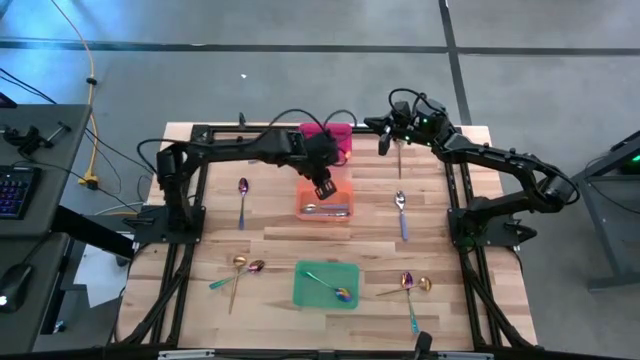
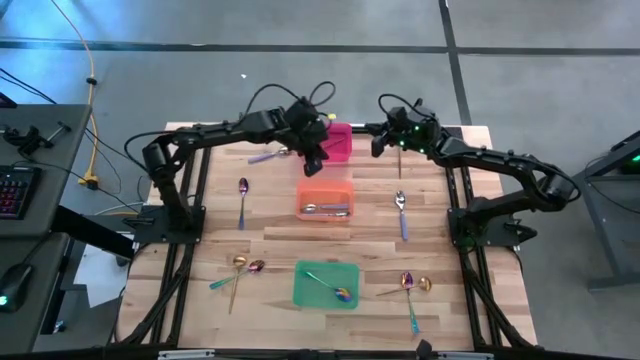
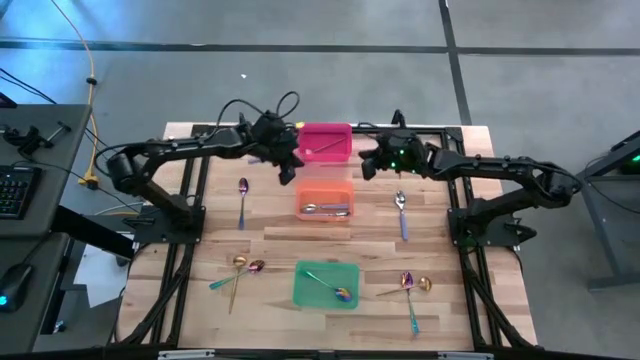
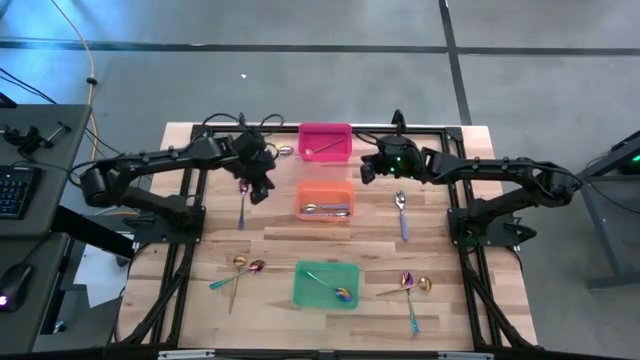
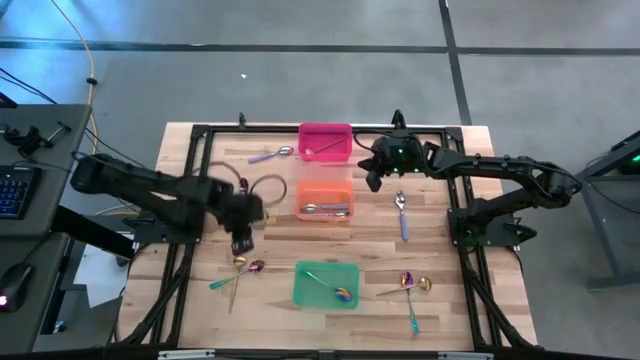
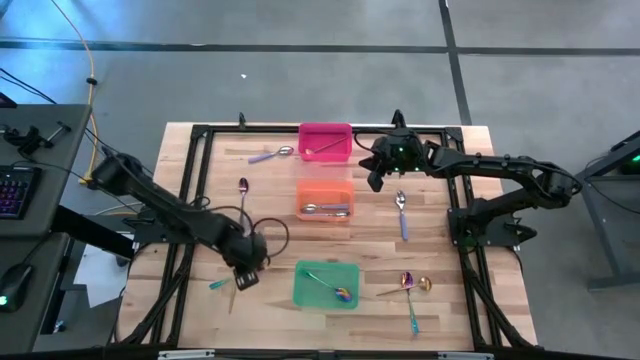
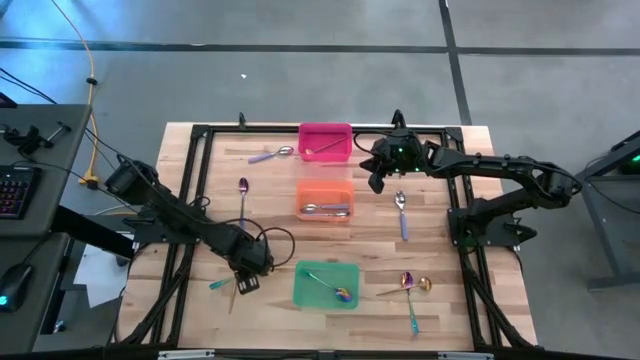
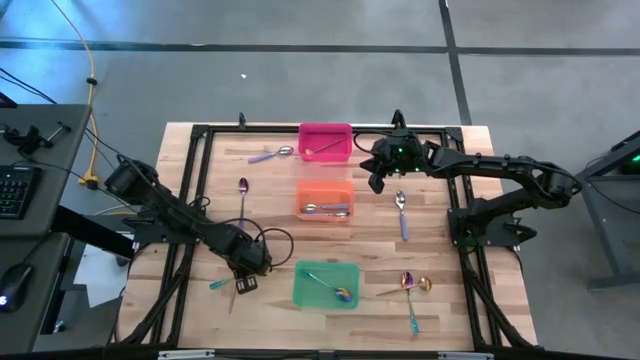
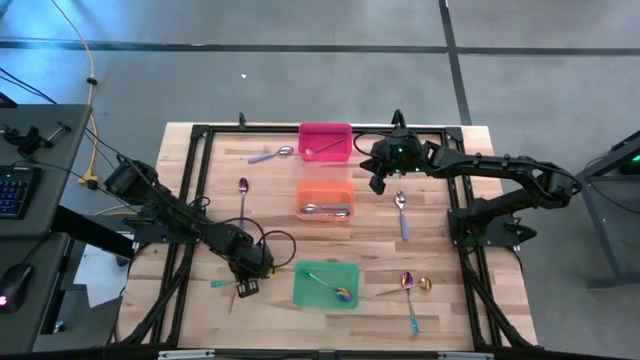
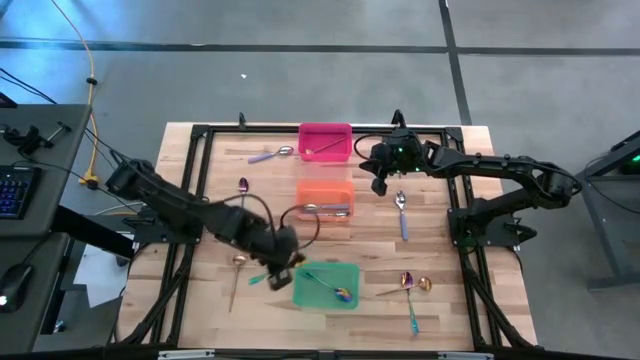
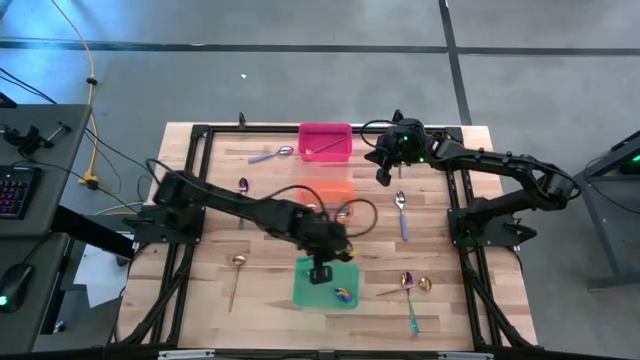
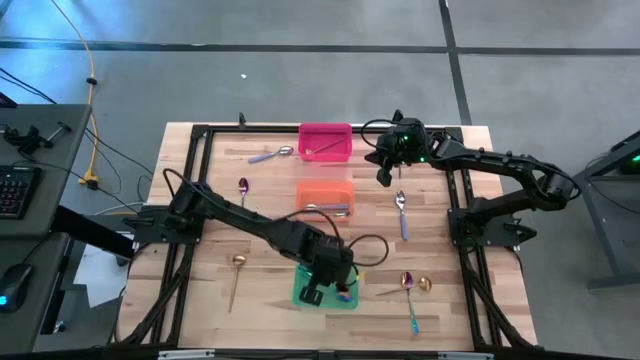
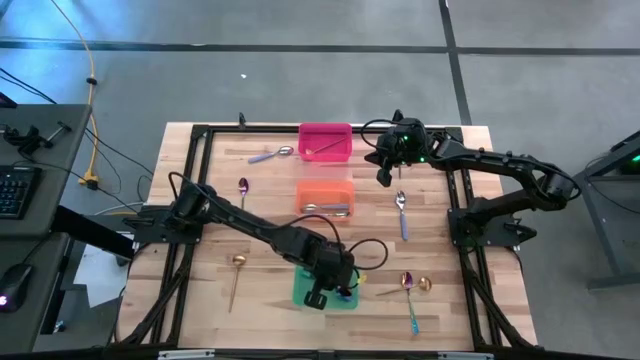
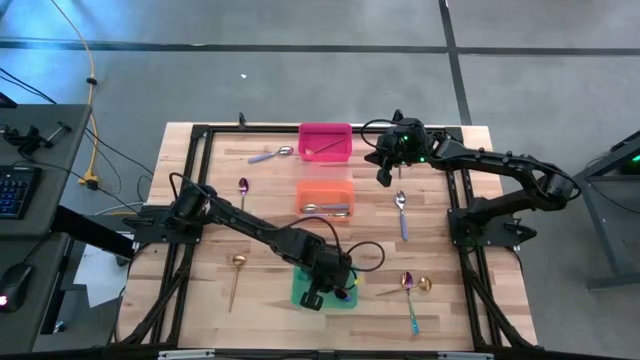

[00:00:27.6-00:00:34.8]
Task: Sort silverware by color (type)
Put the blue spoon into the green bin

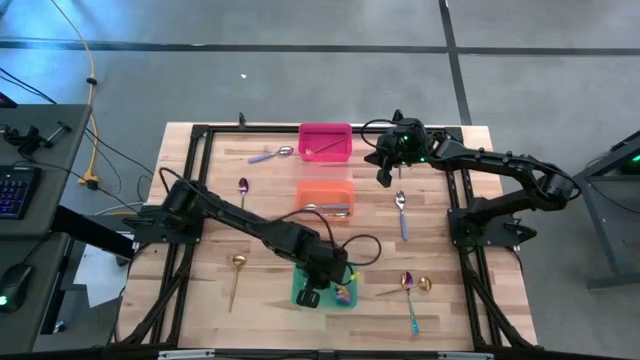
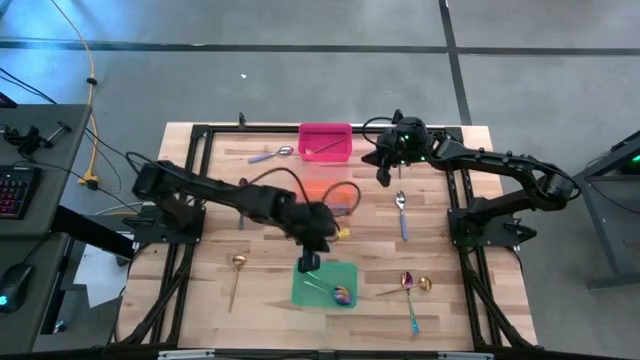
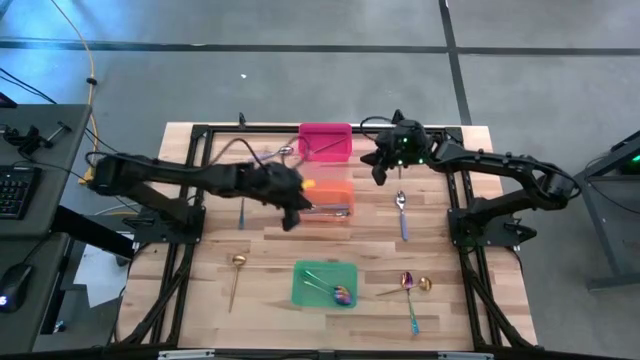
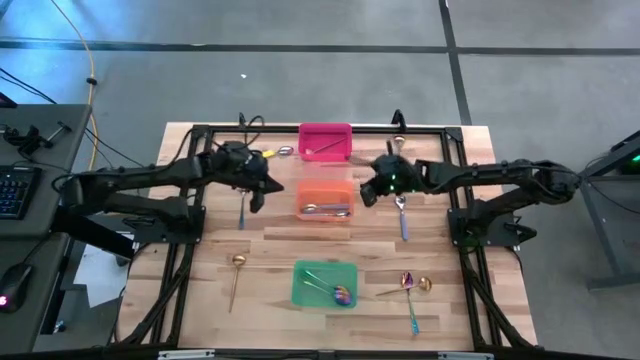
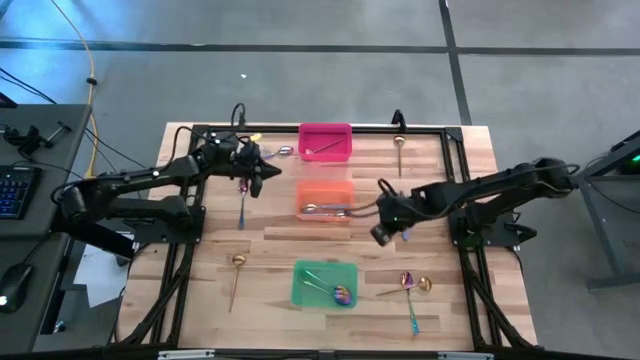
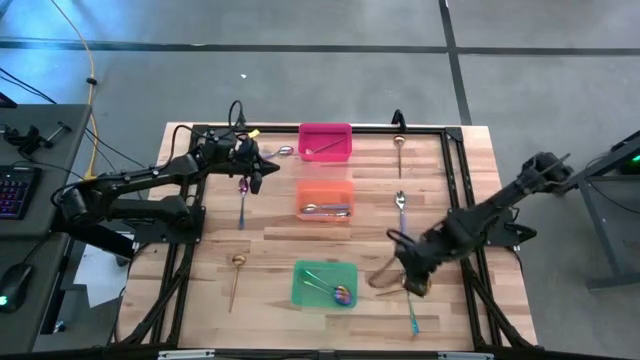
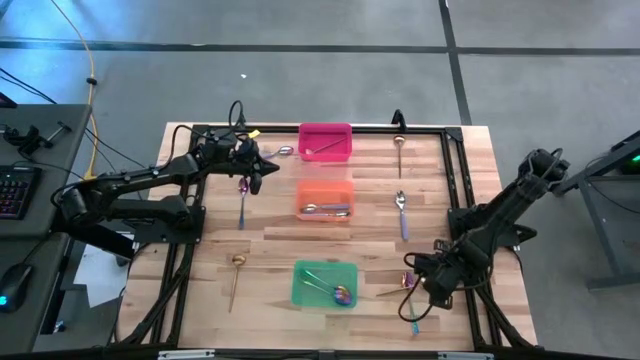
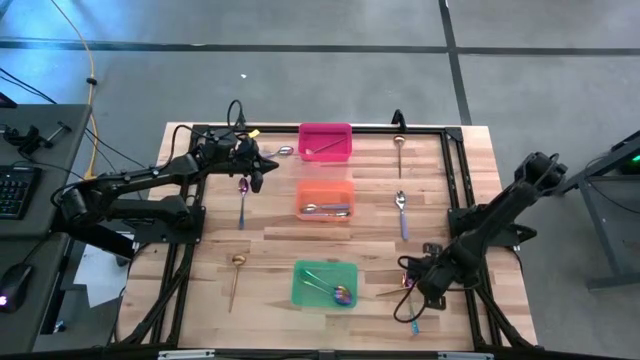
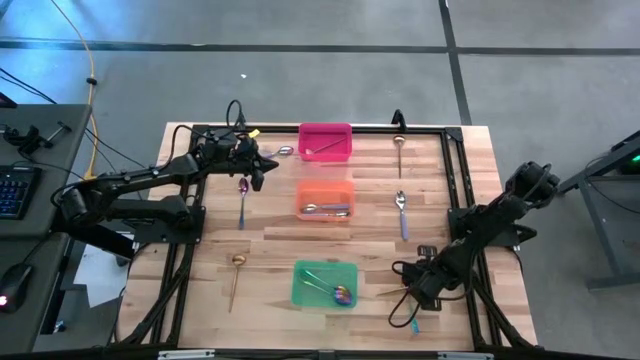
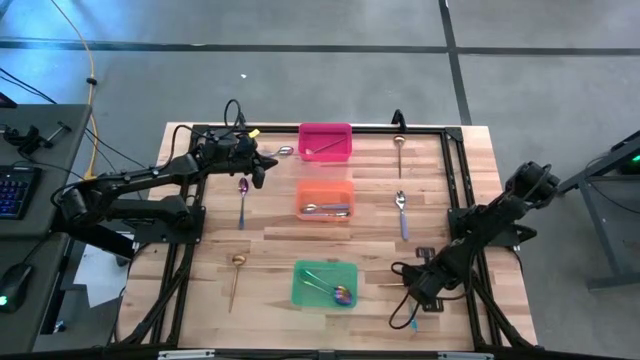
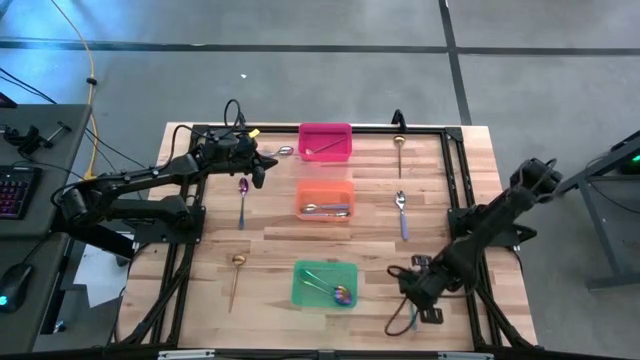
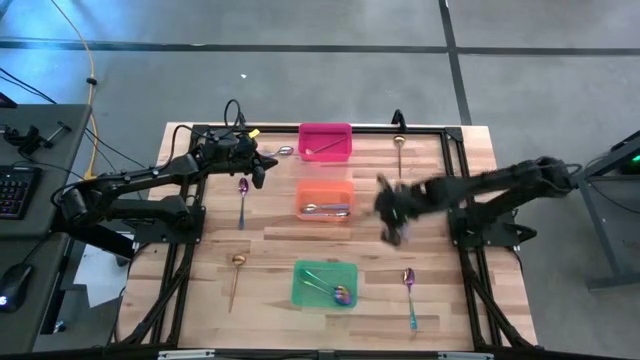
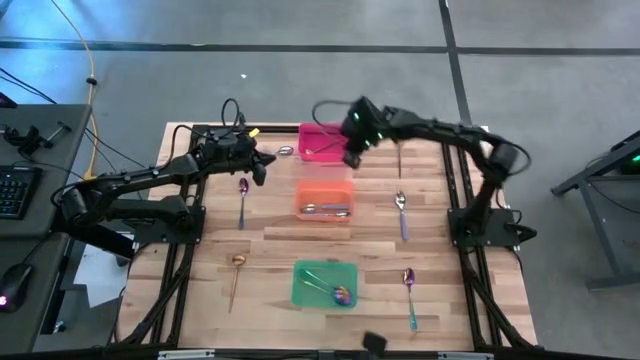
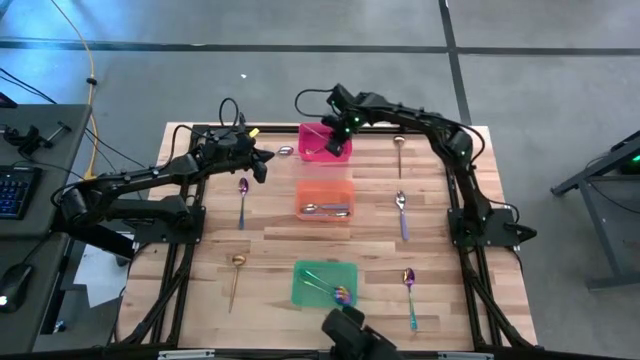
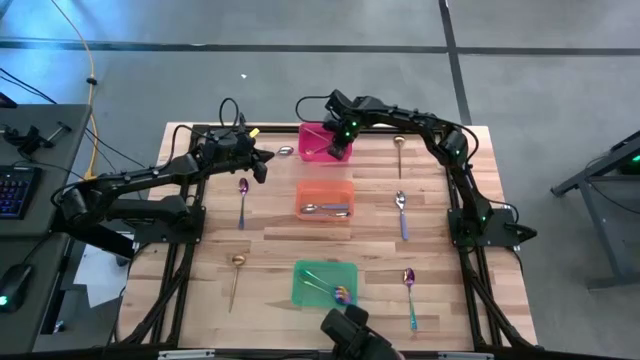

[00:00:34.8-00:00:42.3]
Put the gold spoon into the red bin

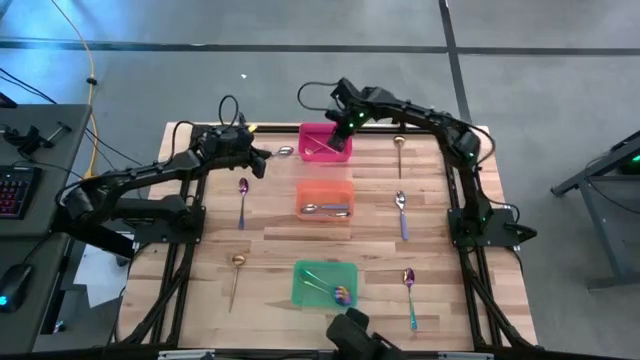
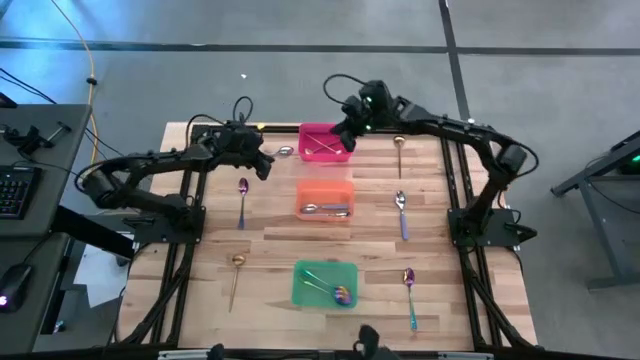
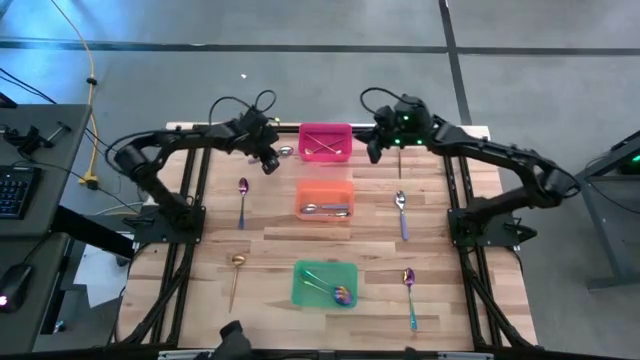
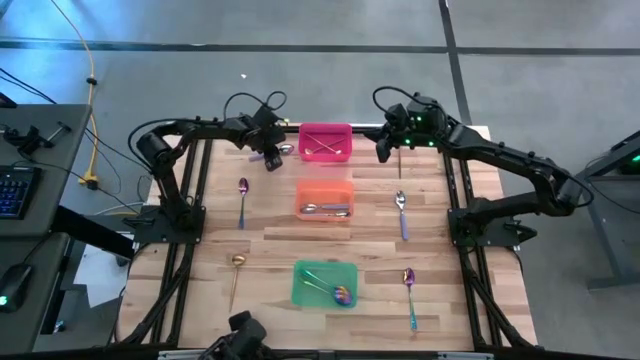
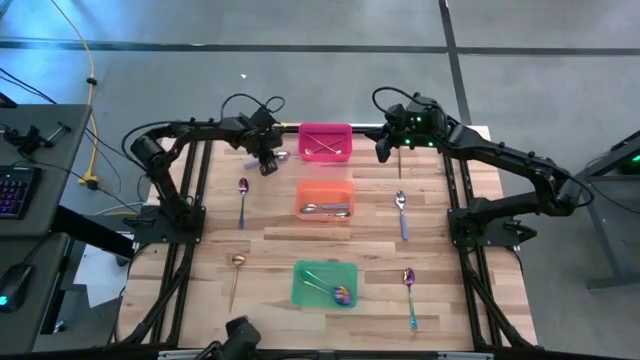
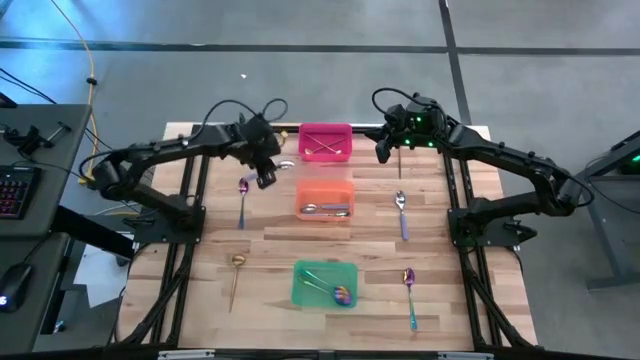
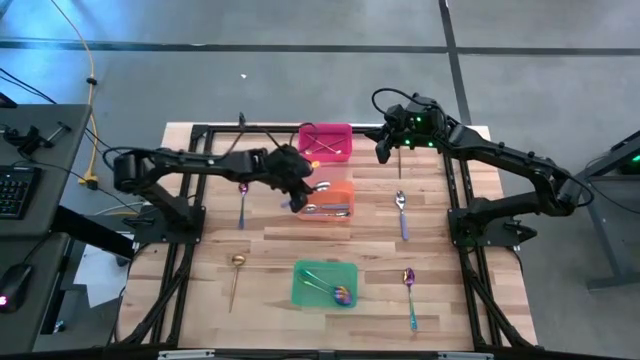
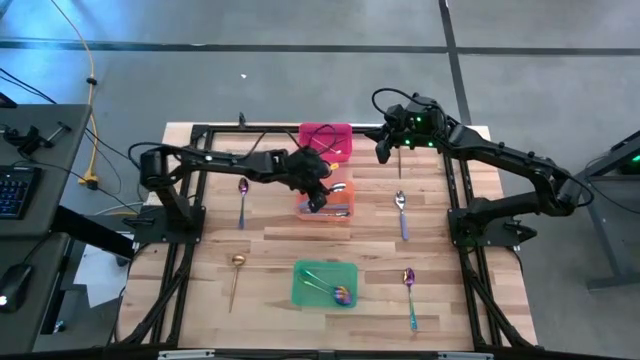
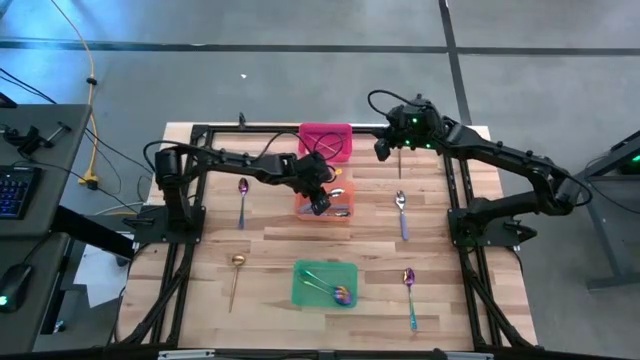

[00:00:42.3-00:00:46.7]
Put the purple spoon into the orange bin

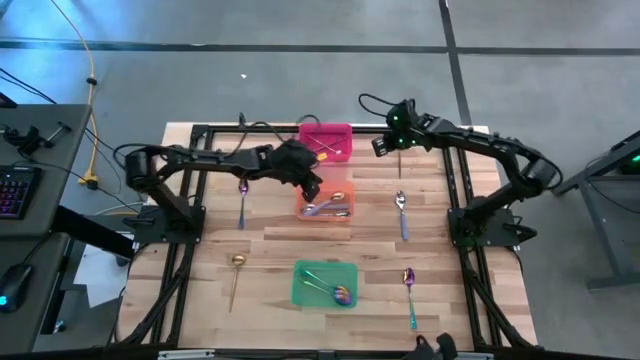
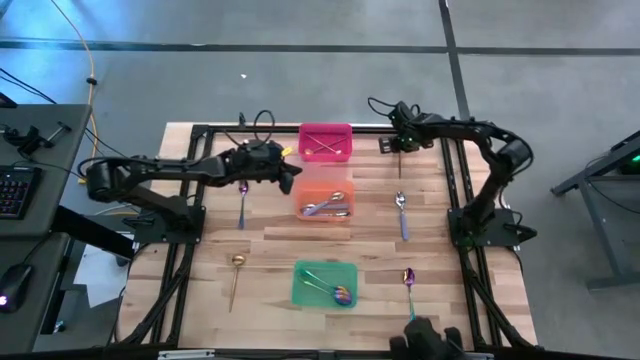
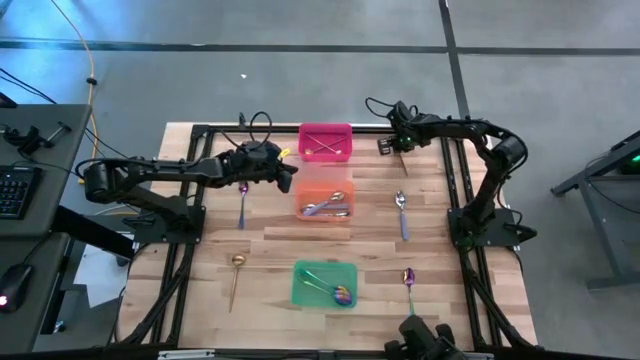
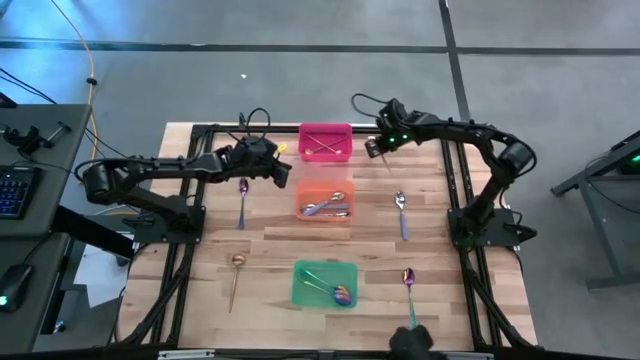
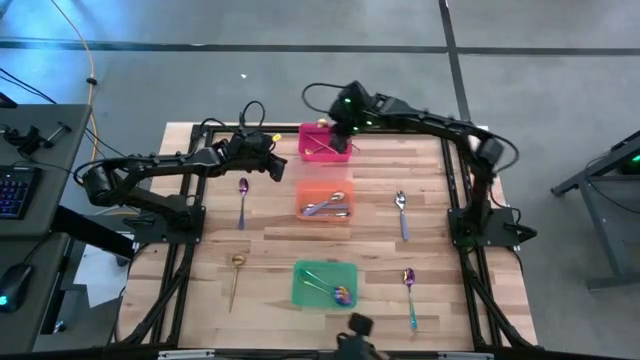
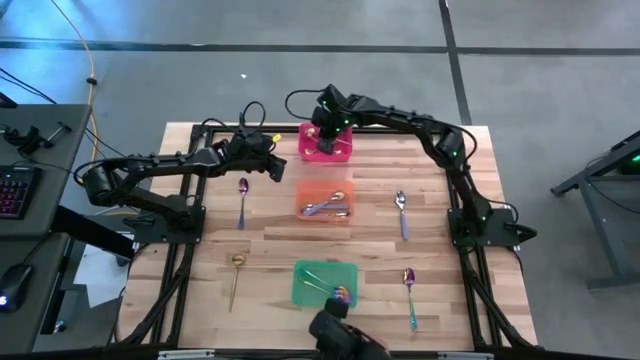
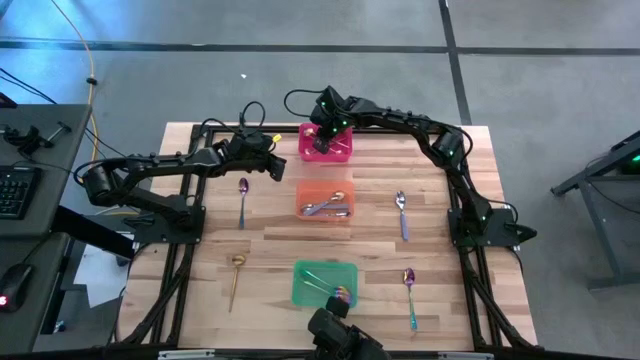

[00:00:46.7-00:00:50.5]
Put the gold spoon into the red bin
